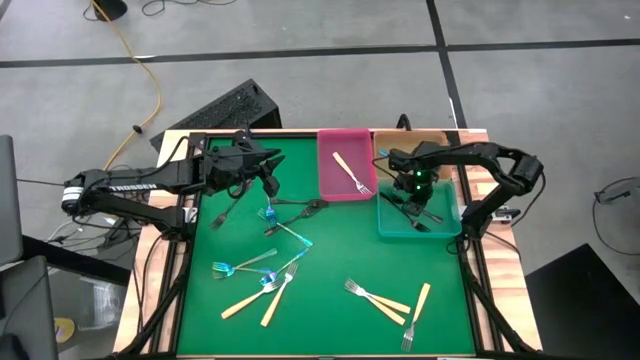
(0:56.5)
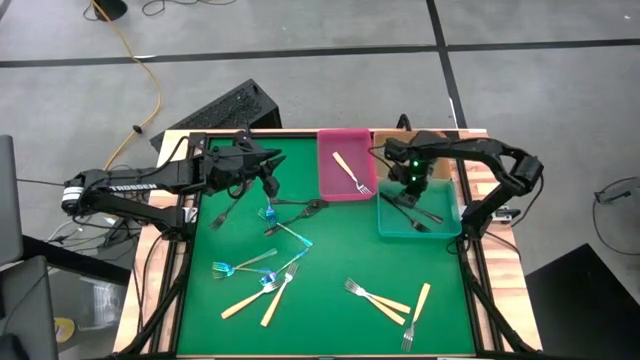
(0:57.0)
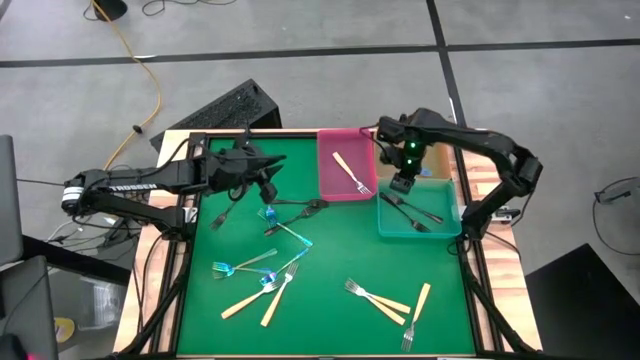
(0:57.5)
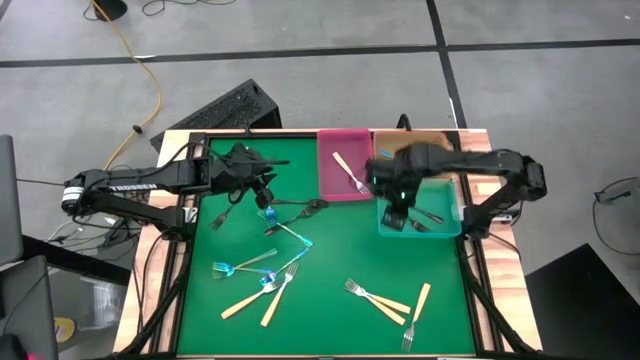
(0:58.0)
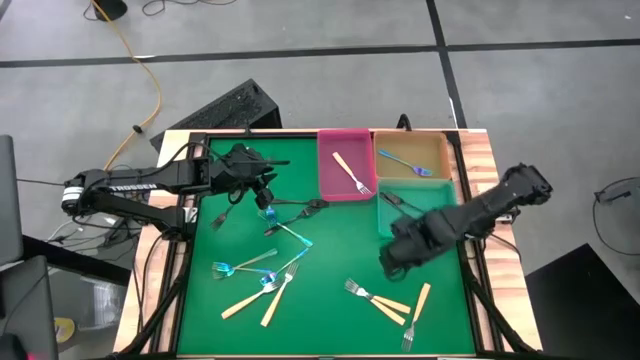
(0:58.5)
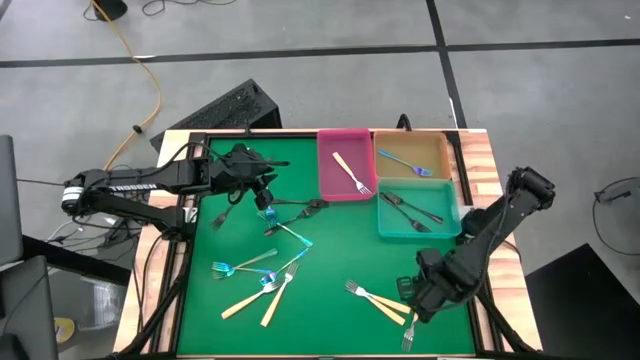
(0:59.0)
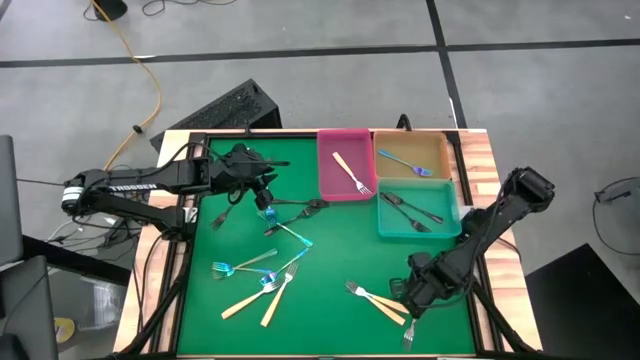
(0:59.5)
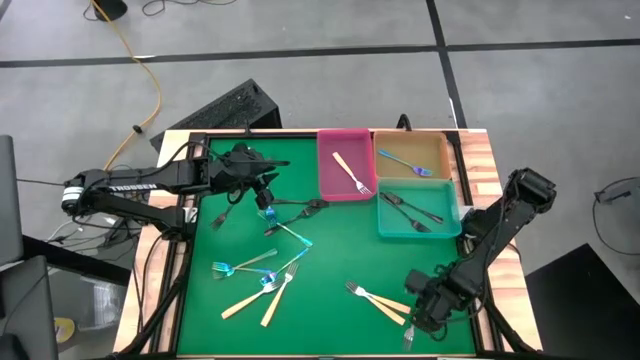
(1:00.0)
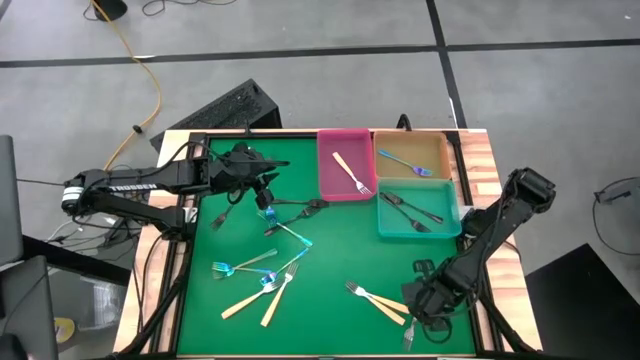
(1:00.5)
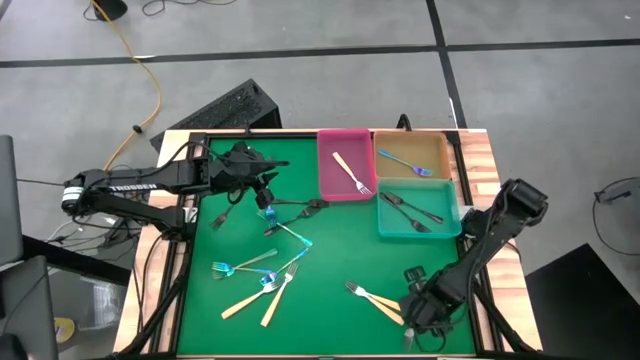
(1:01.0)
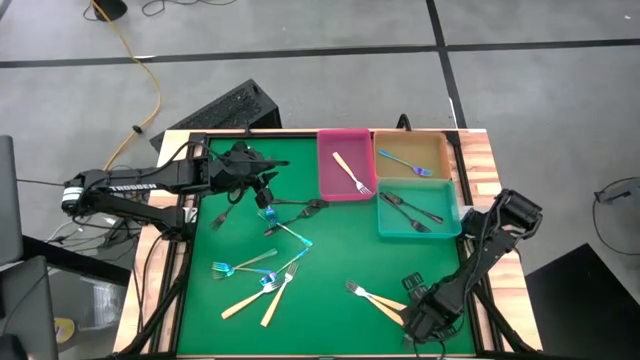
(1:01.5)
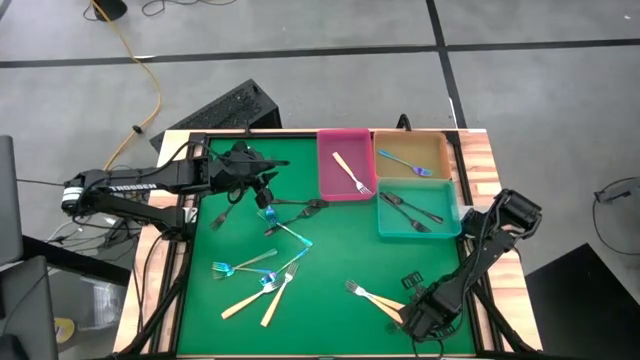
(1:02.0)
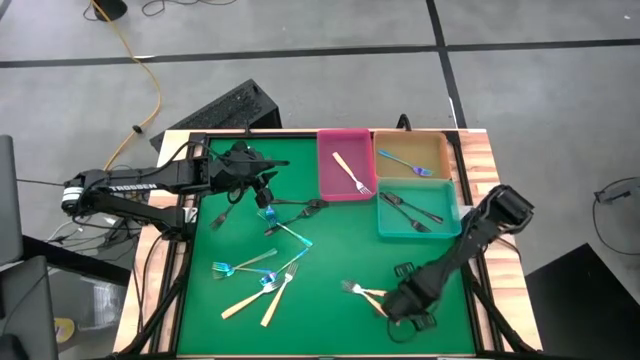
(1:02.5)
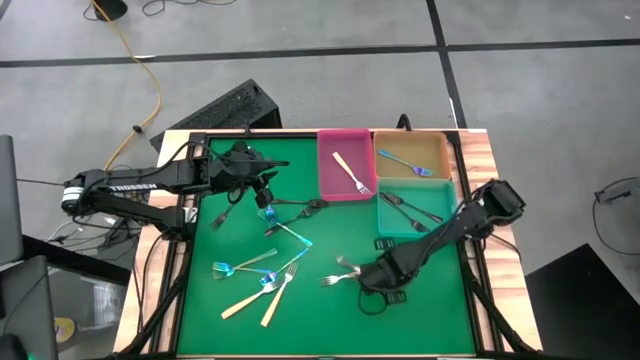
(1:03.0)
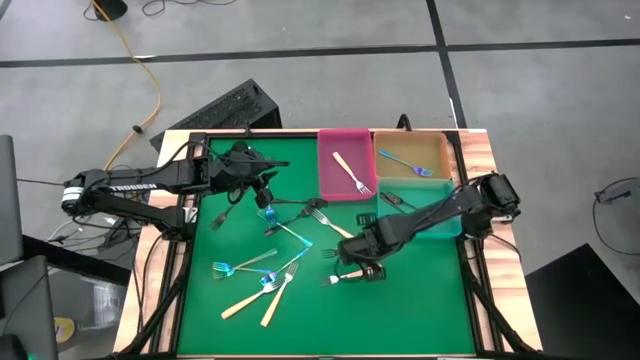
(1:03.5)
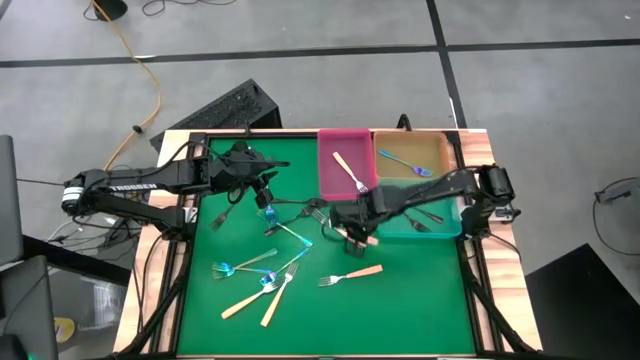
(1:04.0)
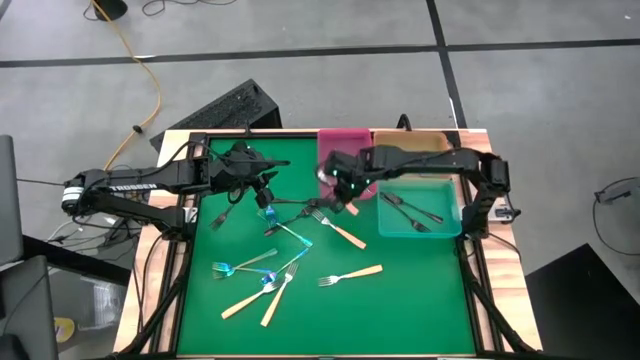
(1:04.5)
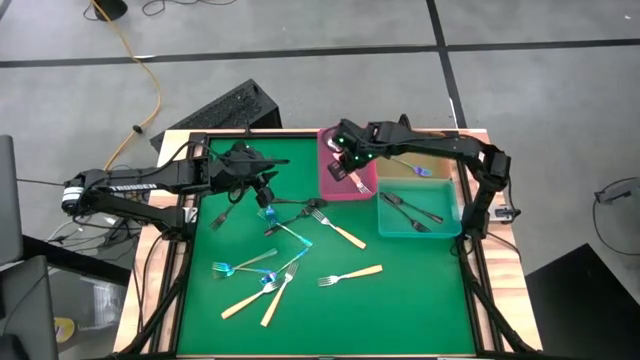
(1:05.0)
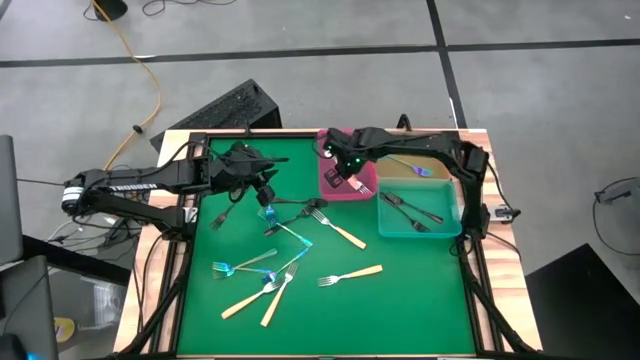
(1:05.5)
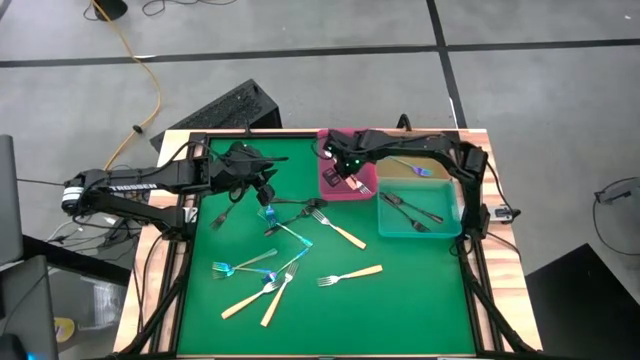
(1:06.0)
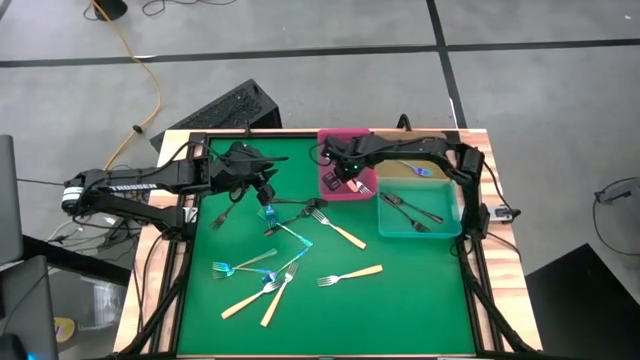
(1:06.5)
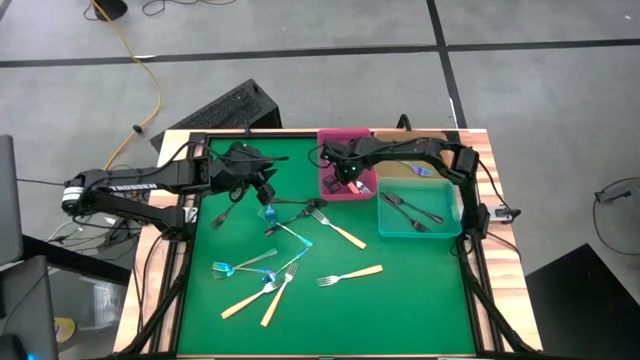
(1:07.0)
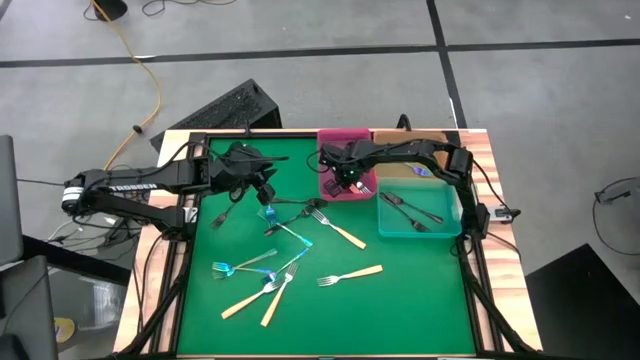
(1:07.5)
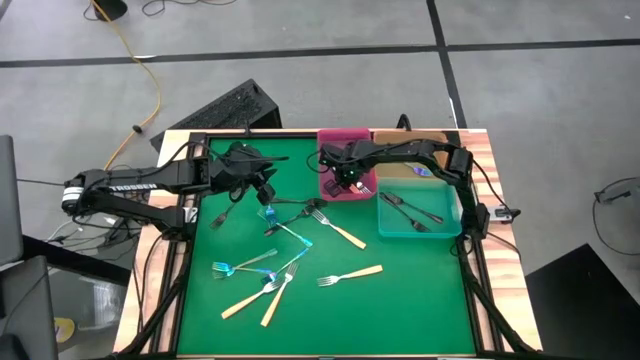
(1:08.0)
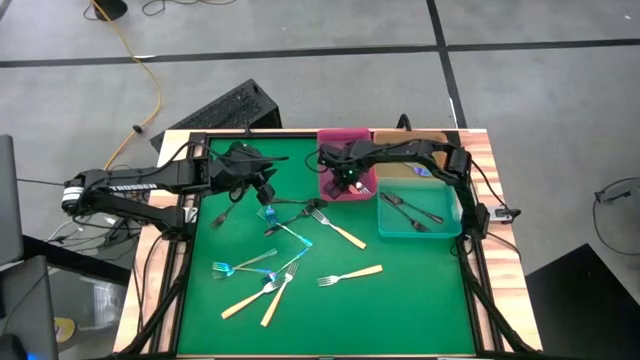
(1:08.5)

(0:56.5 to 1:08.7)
Task: Sort silverware by color (type)
Put the yellow fork into the pink bin

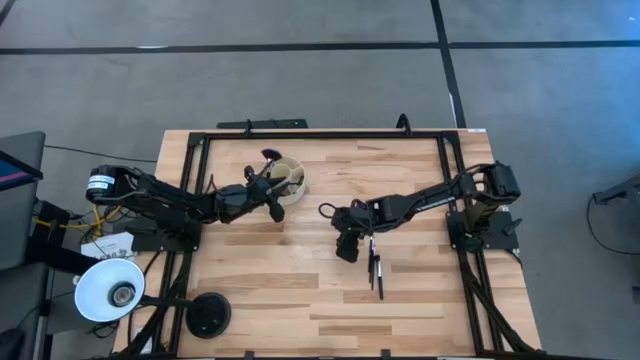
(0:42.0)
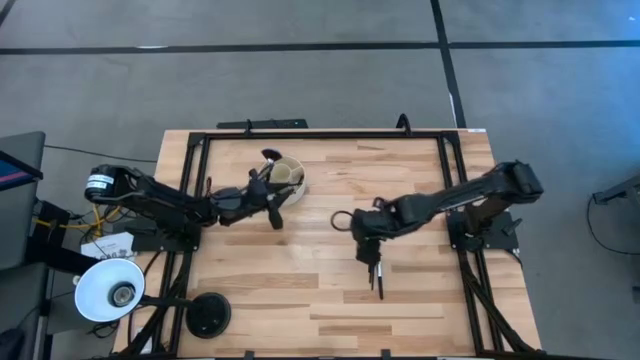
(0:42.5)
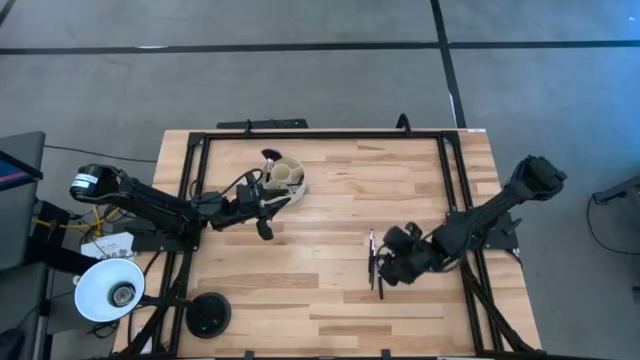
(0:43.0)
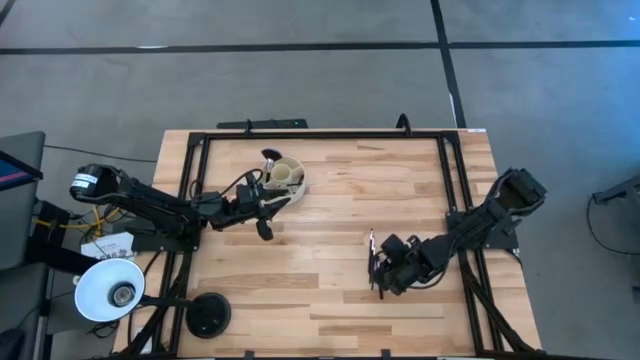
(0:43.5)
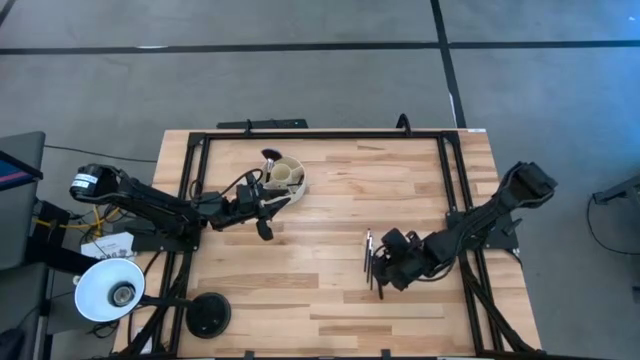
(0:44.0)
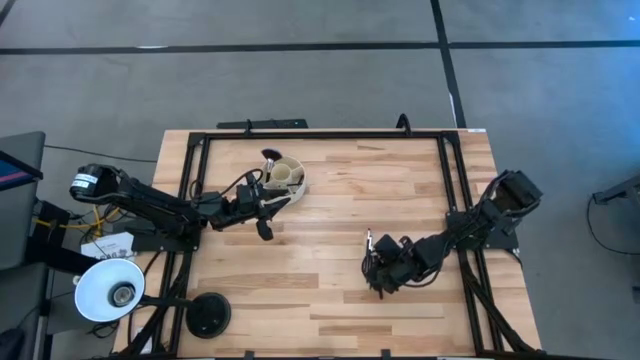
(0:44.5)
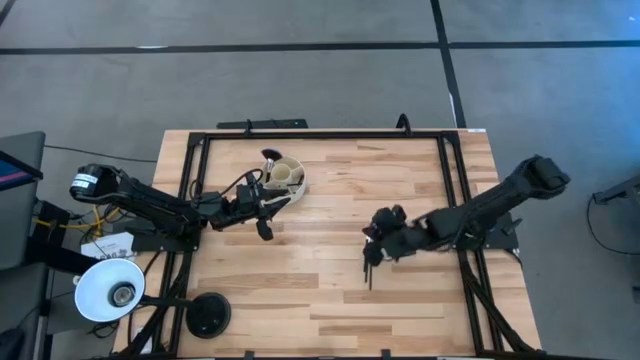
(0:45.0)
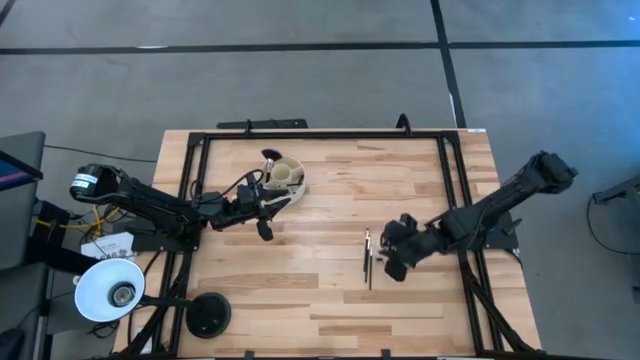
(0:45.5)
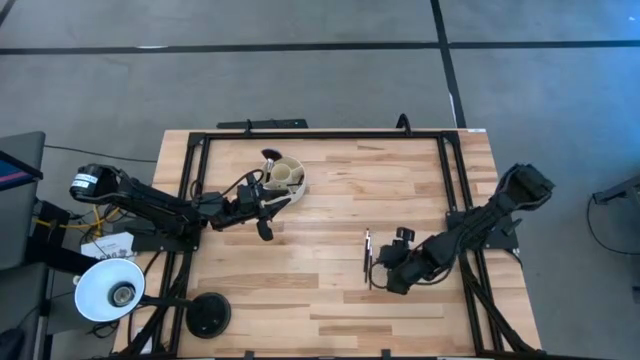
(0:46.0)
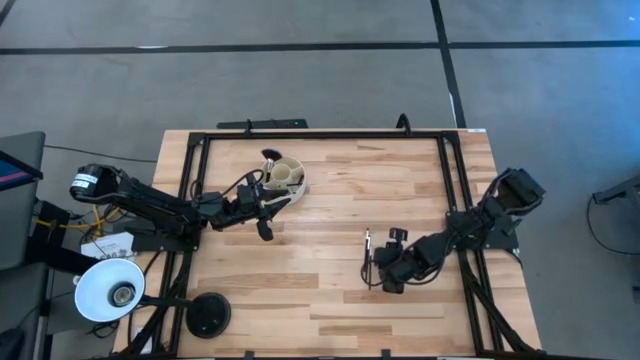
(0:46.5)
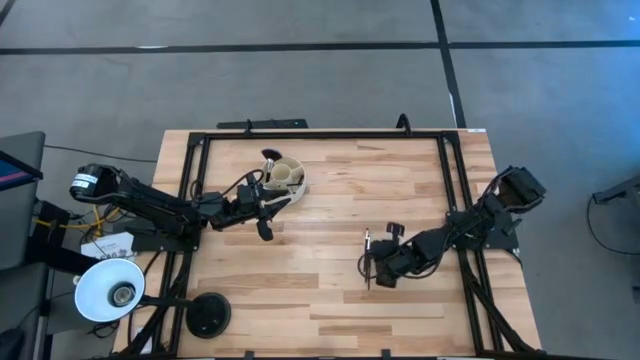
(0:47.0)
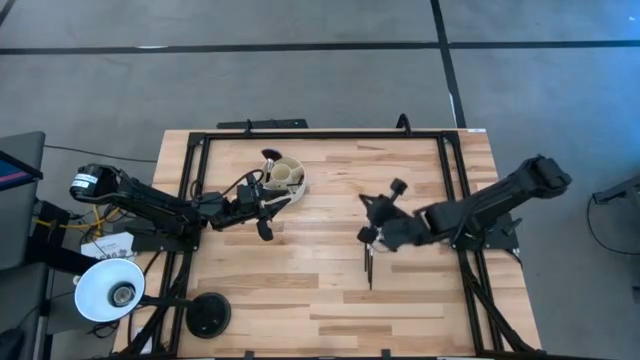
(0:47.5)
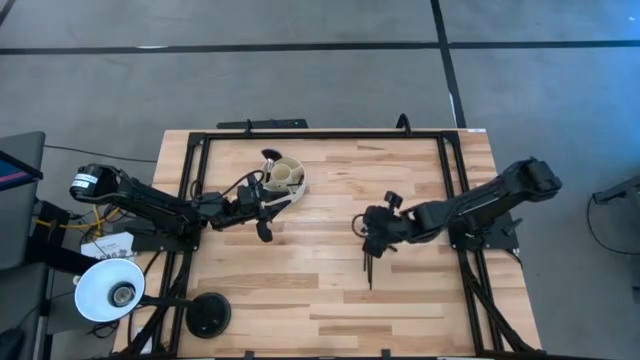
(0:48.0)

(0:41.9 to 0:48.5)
Task: Sort items
Put the black eyeshadow brush in the white organizer

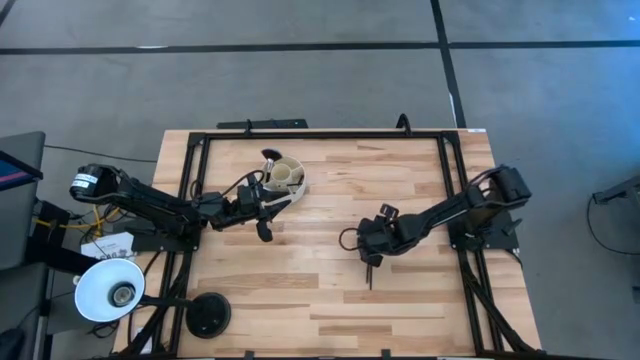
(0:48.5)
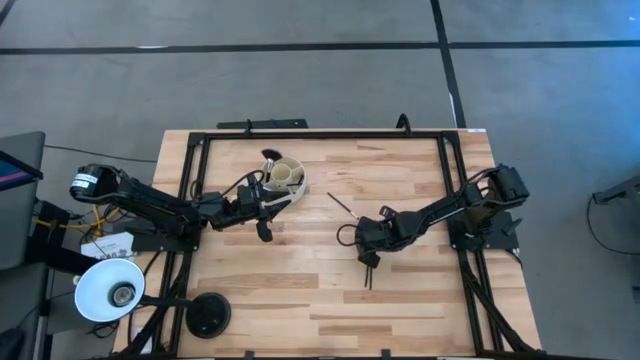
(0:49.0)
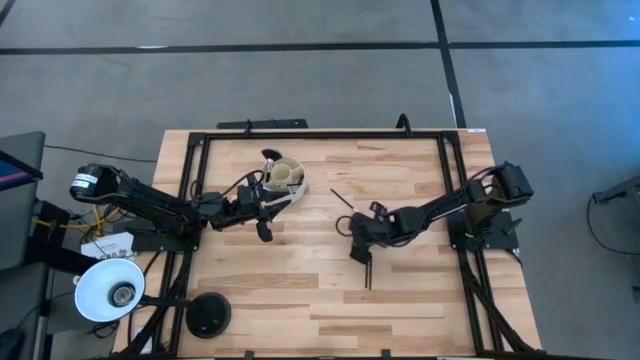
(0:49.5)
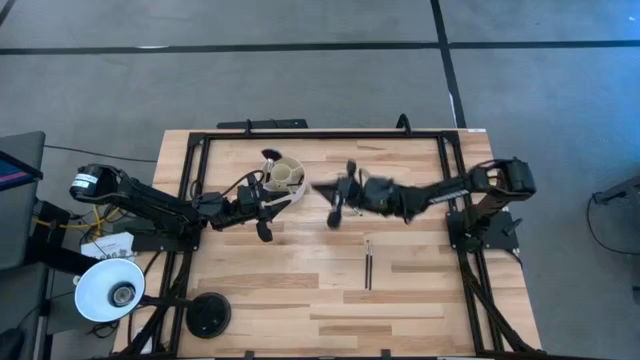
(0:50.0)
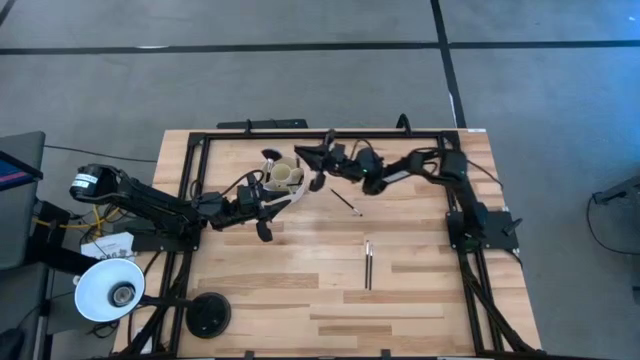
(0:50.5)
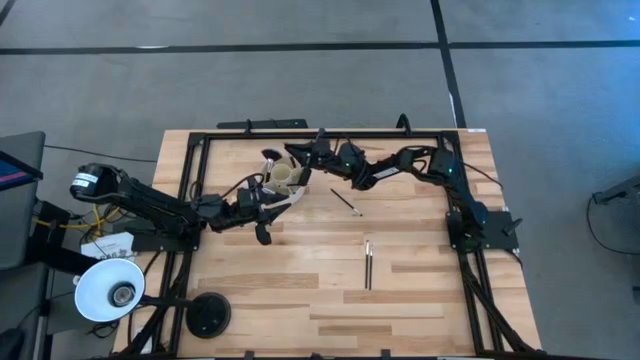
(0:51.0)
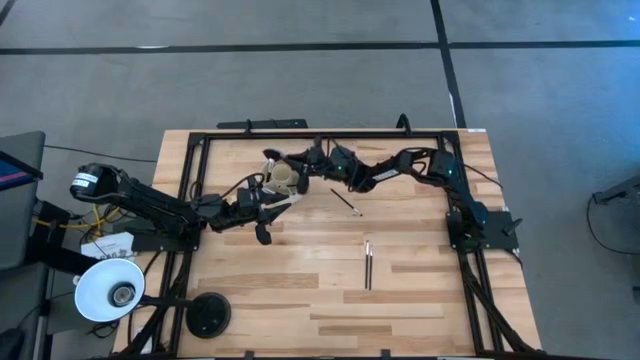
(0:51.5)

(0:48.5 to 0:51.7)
Put the black eyeshadow brush in the white organizer
